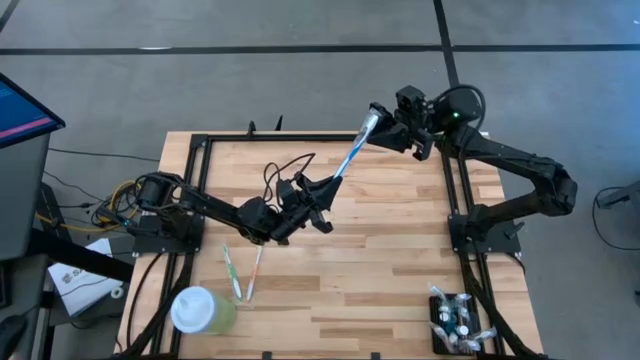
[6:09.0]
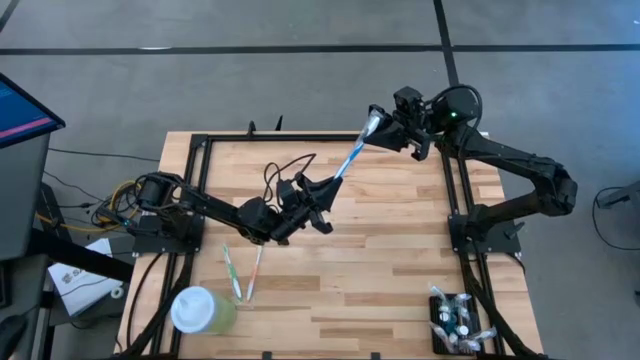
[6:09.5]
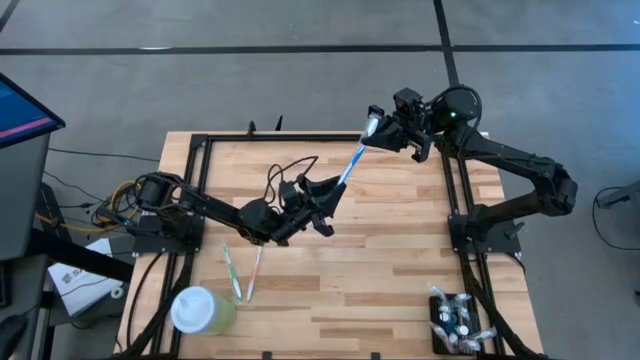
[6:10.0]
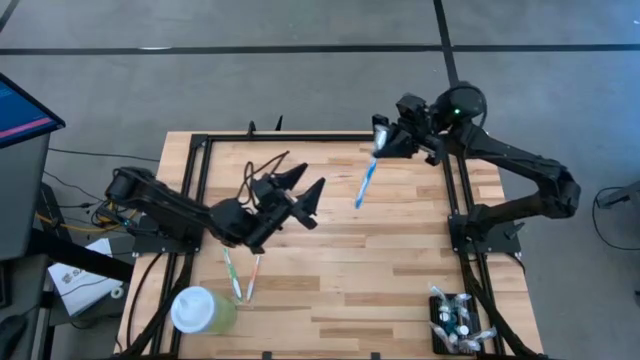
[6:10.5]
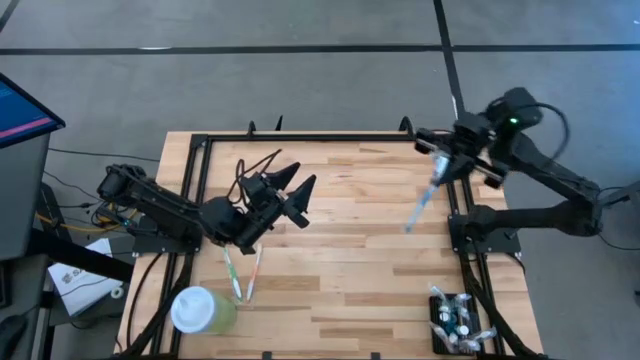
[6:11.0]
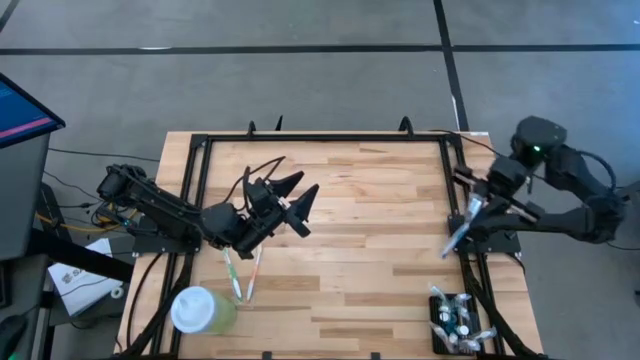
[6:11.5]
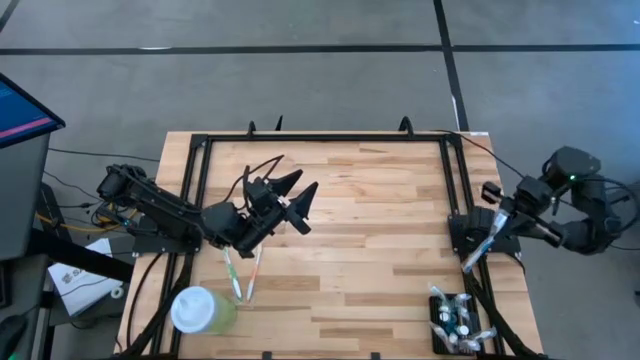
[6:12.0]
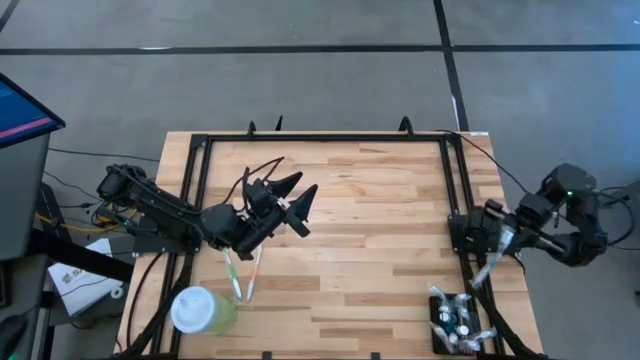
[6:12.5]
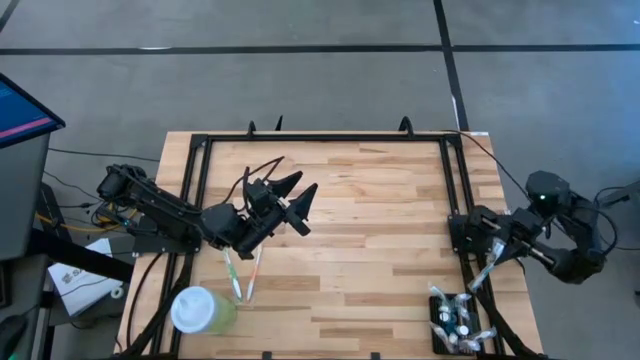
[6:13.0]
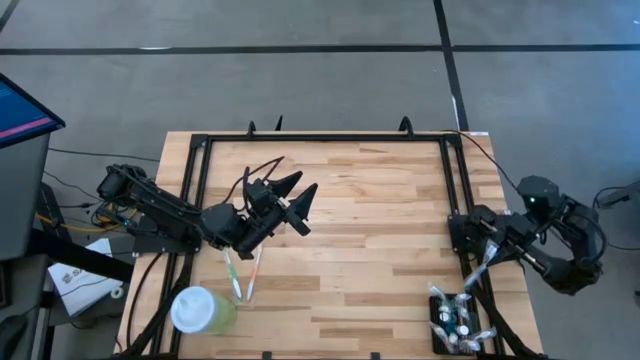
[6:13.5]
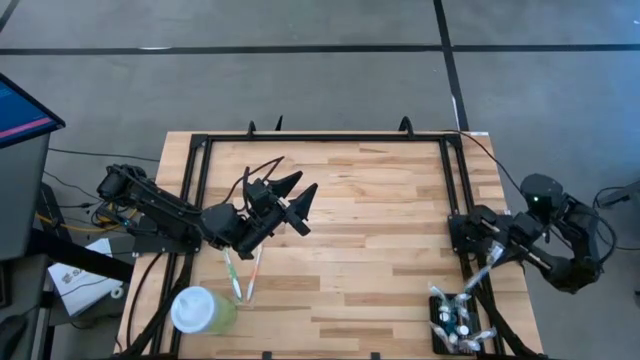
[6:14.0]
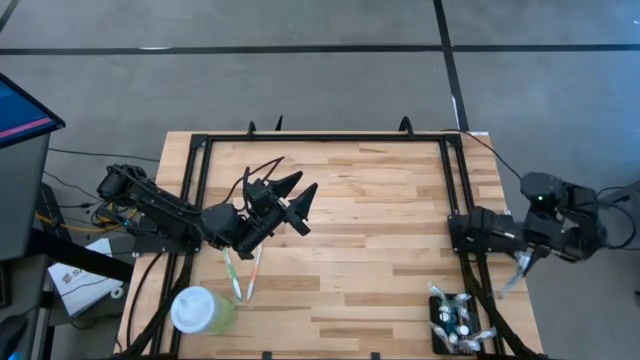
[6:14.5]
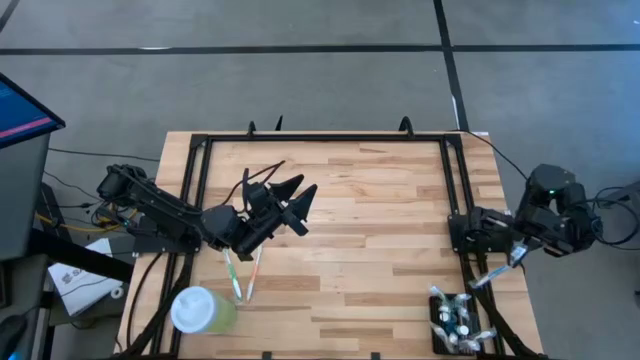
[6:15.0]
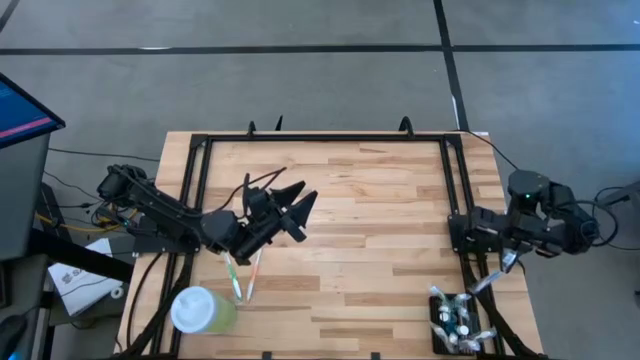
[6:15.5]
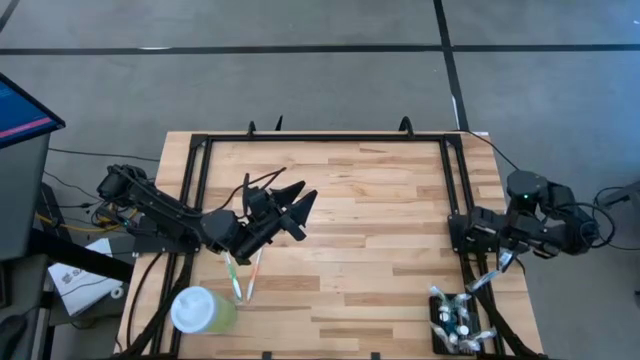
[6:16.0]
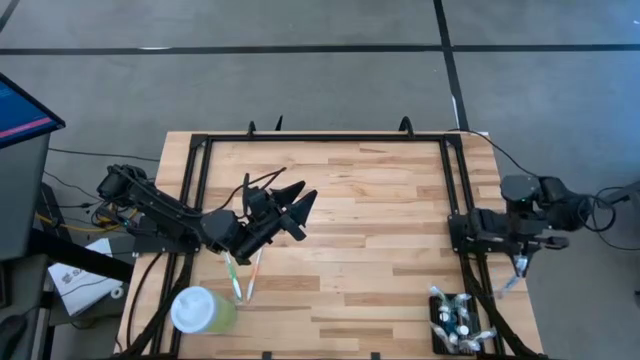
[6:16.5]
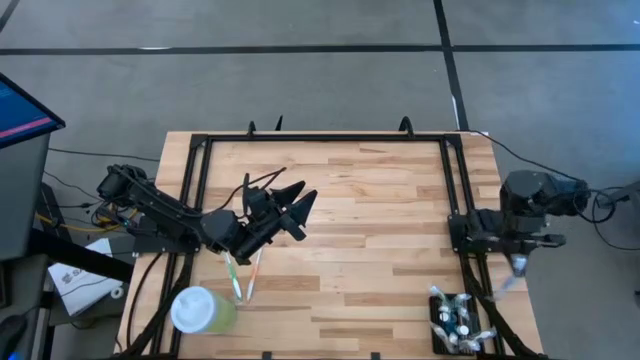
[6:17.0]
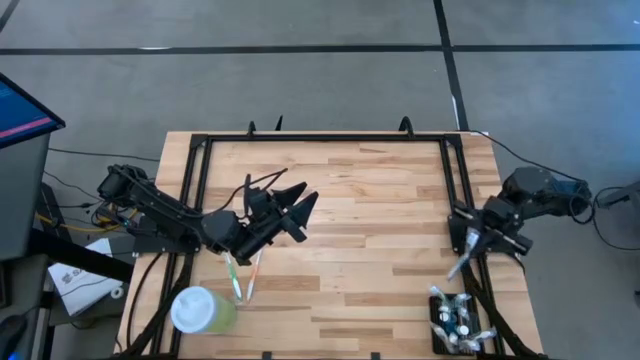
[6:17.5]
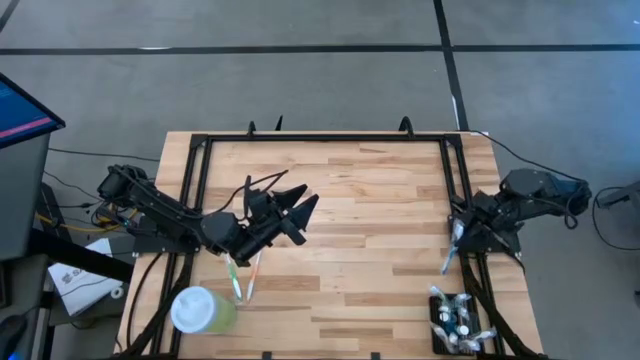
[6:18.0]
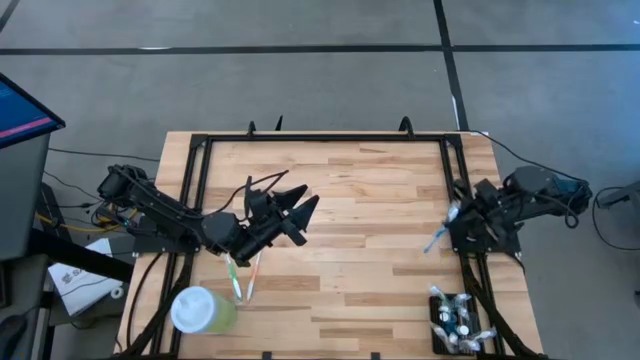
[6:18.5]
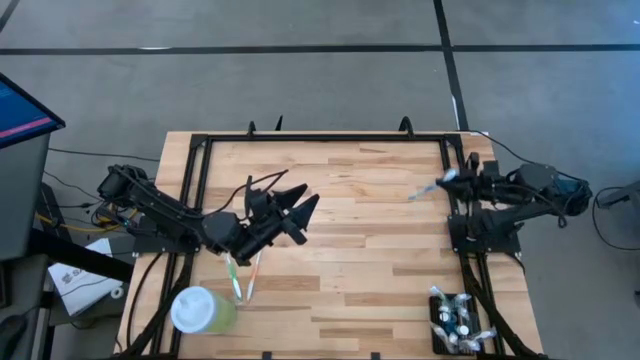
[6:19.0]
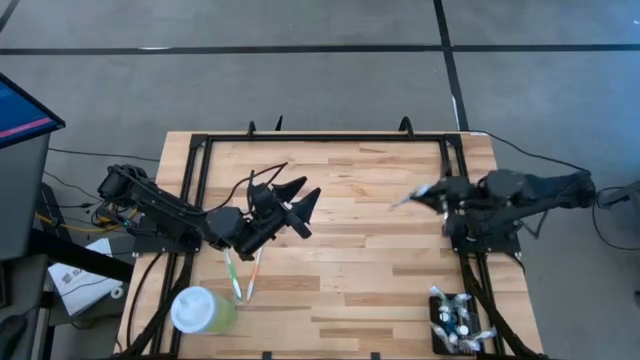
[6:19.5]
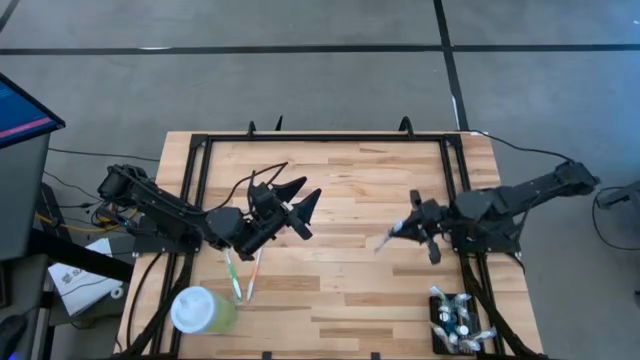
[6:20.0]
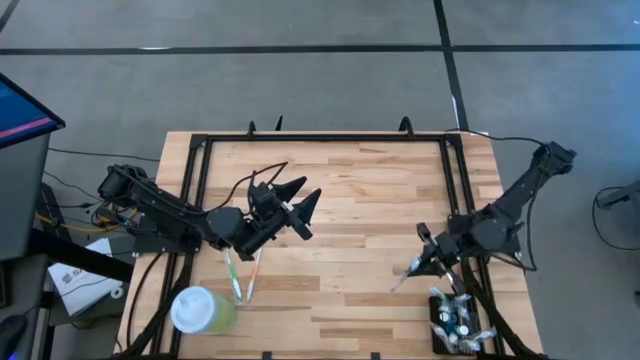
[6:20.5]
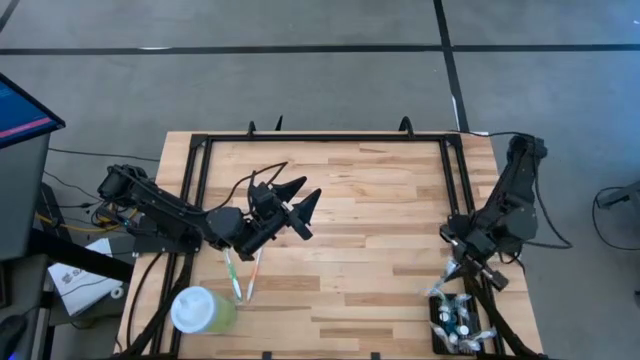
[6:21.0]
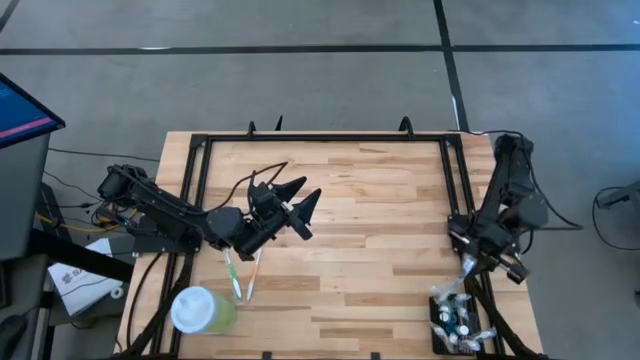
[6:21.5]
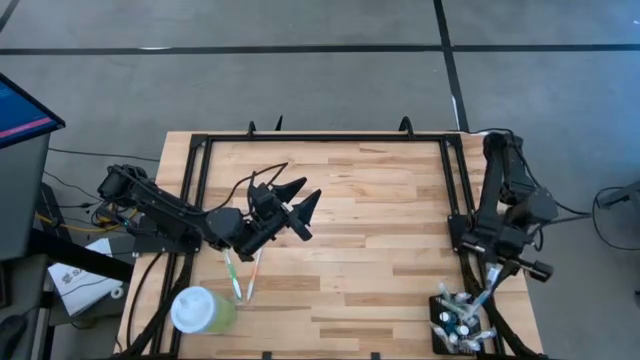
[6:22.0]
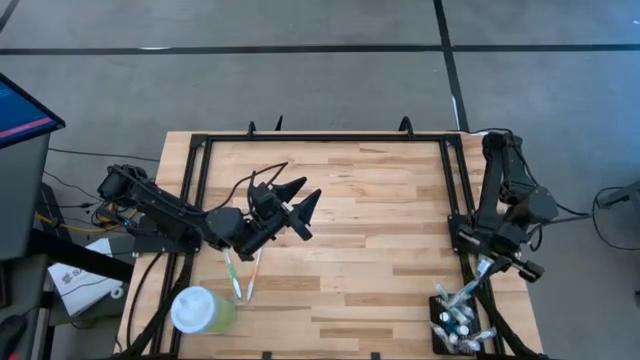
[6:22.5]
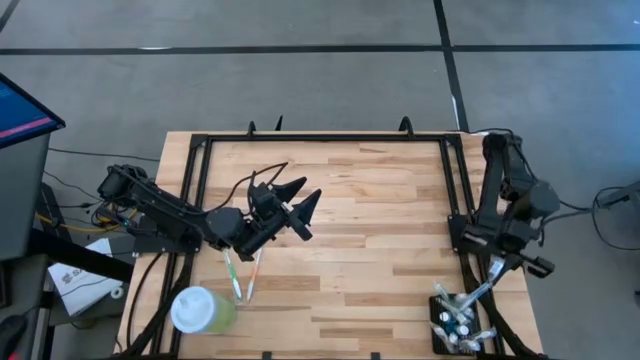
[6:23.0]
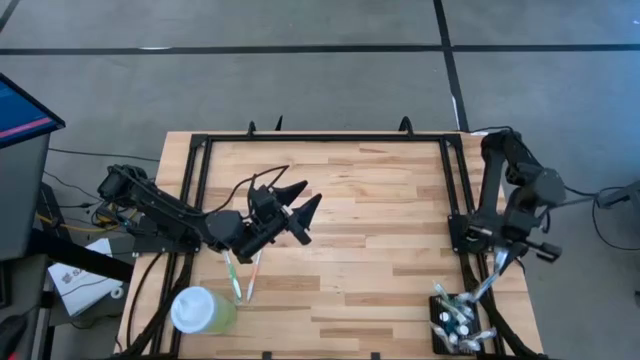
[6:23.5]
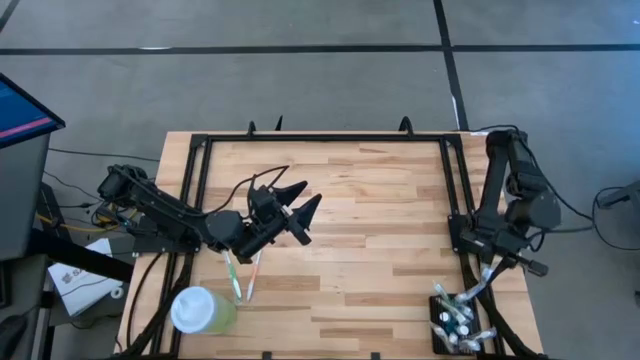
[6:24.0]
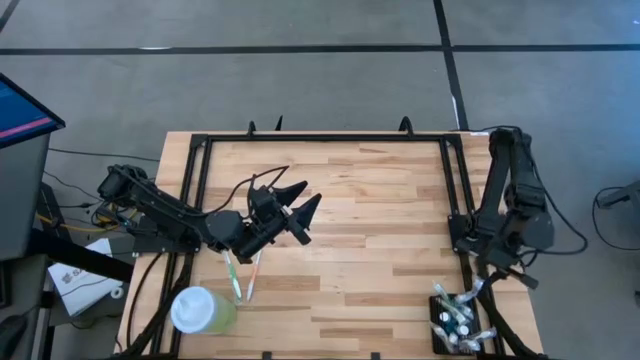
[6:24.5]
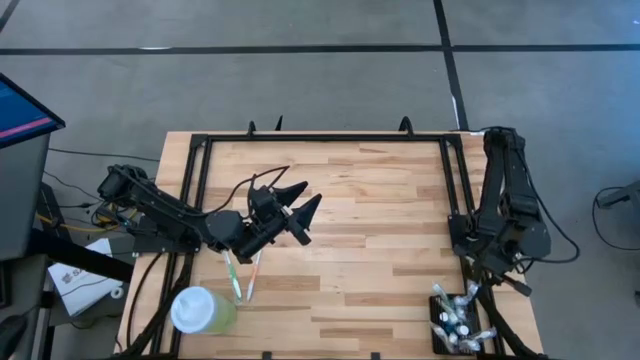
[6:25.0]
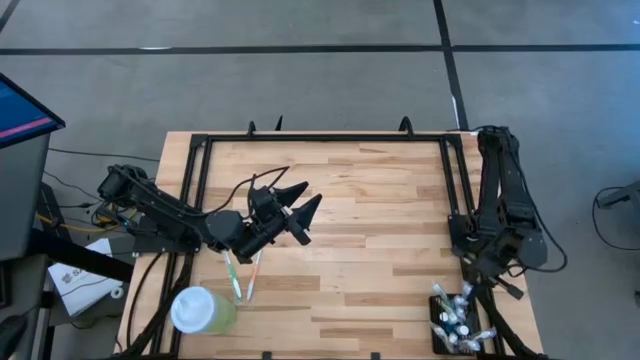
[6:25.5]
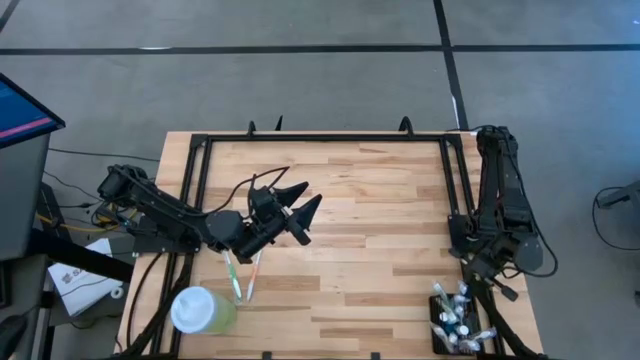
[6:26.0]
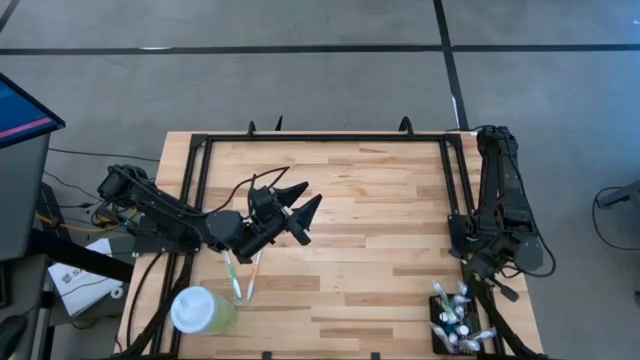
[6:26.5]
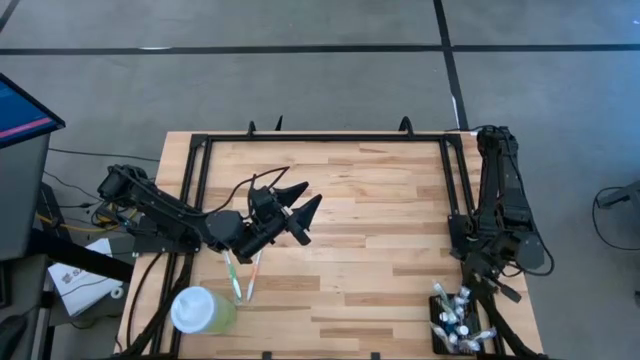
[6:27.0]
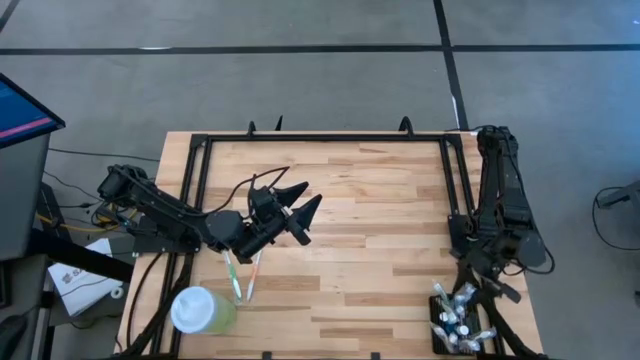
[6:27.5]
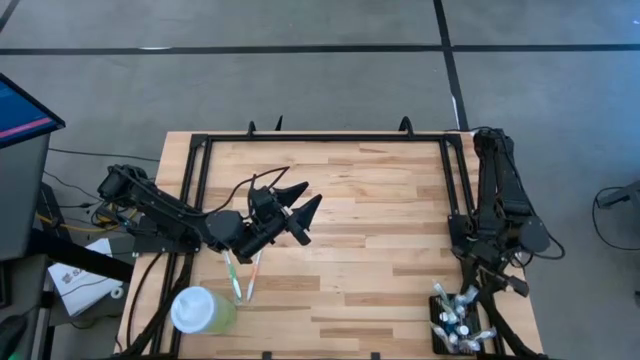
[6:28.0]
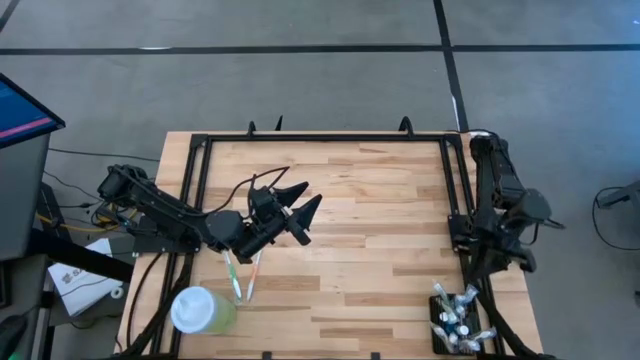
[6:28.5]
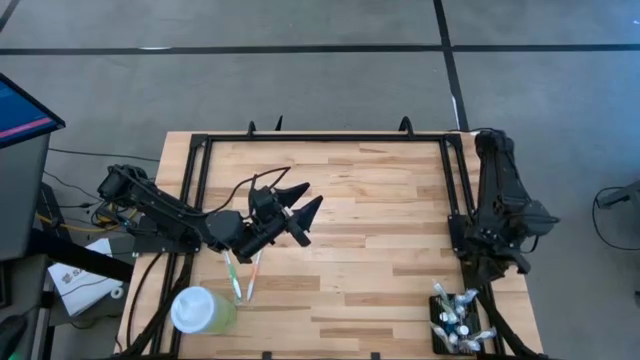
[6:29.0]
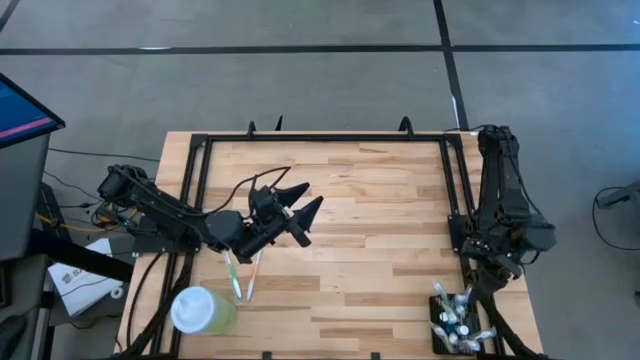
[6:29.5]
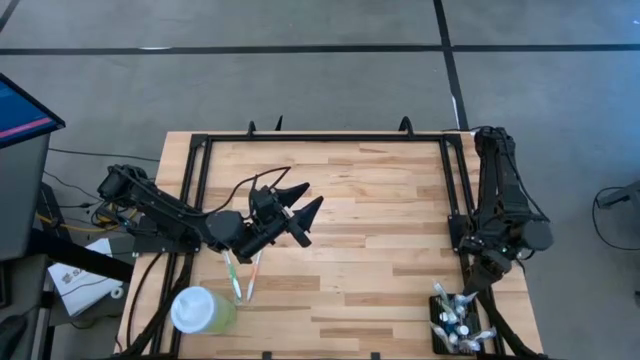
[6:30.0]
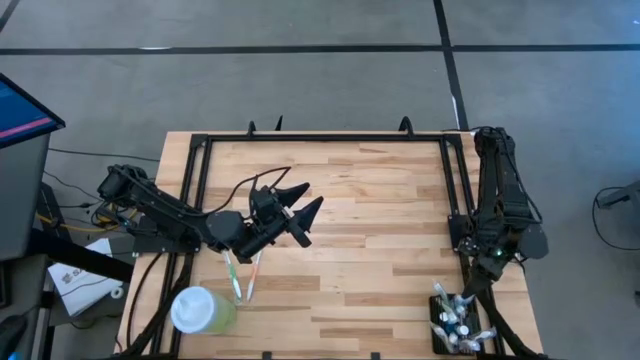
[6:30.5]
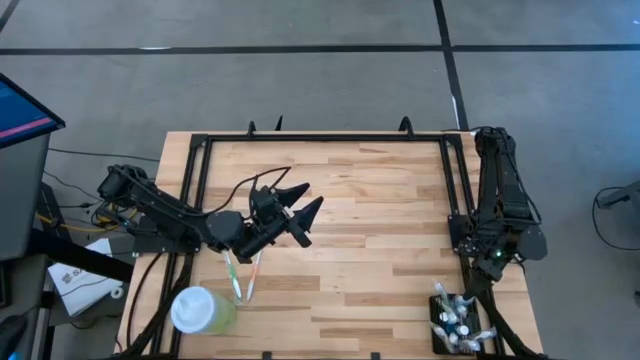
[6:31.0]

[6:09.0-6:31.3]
Task: Pick & Place toothbrushing station
Put the blue toothbrush into the black organizer
